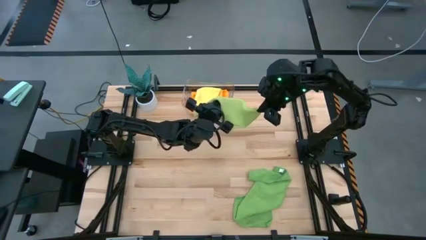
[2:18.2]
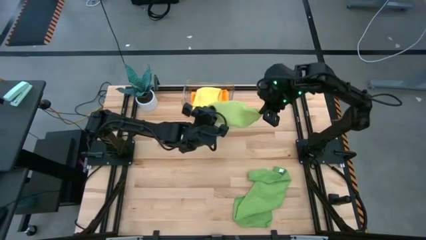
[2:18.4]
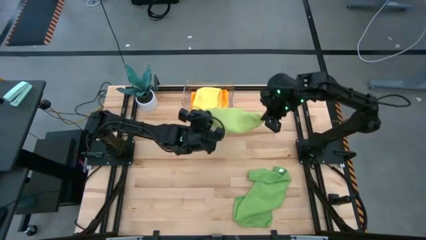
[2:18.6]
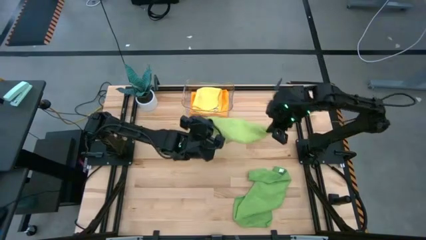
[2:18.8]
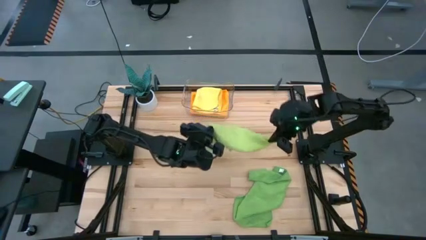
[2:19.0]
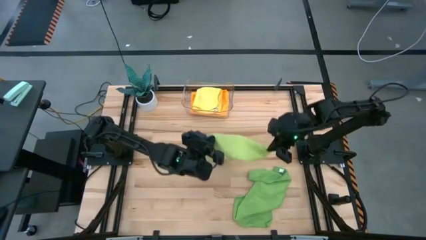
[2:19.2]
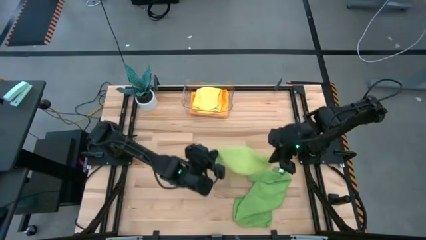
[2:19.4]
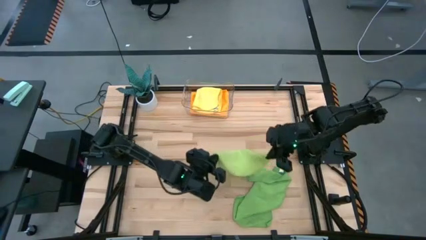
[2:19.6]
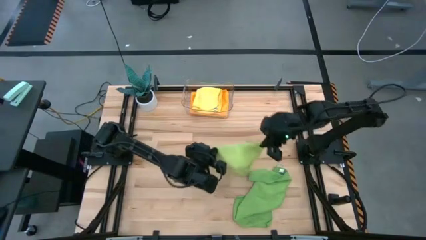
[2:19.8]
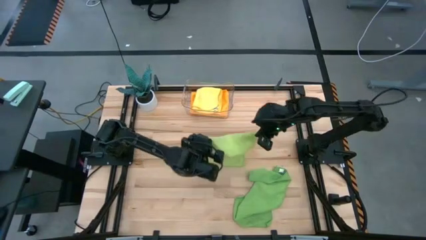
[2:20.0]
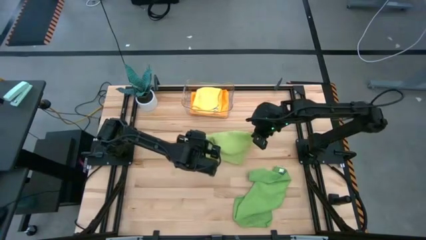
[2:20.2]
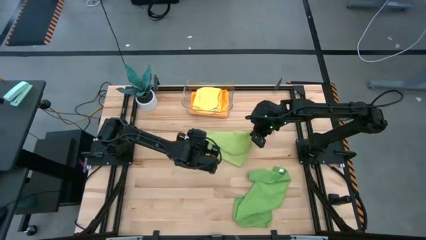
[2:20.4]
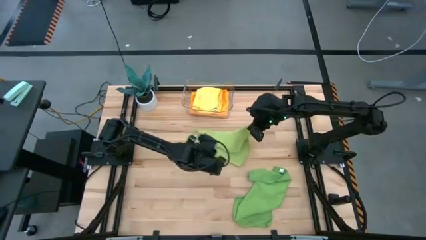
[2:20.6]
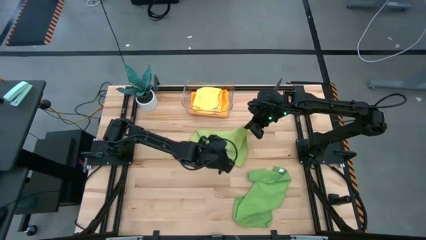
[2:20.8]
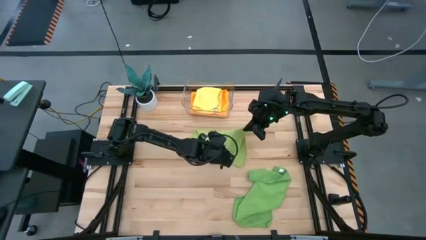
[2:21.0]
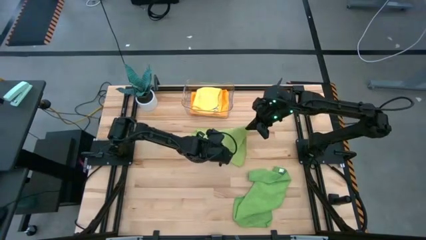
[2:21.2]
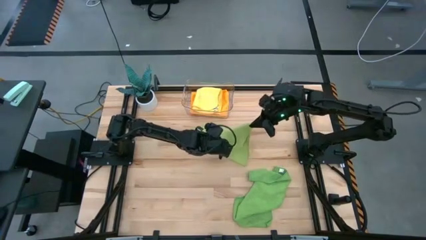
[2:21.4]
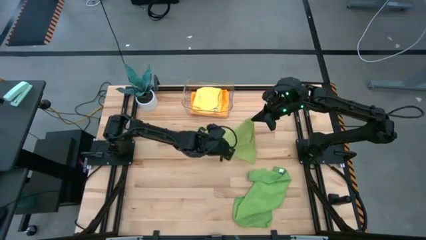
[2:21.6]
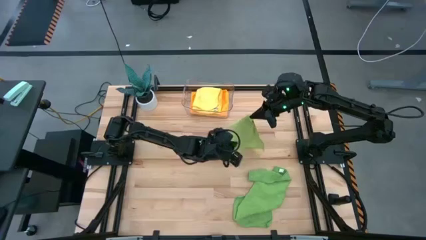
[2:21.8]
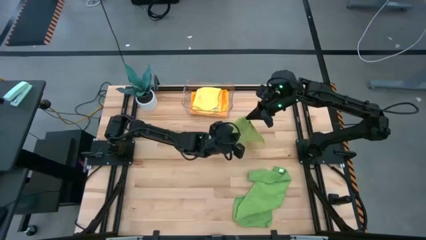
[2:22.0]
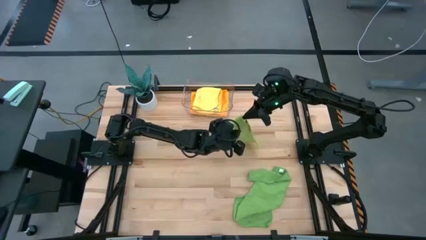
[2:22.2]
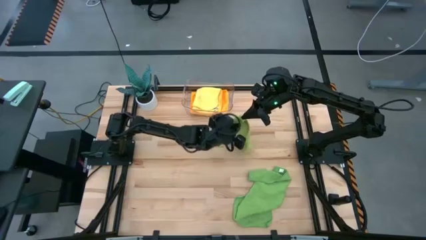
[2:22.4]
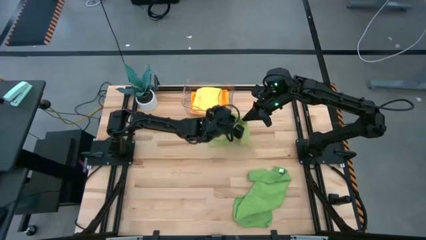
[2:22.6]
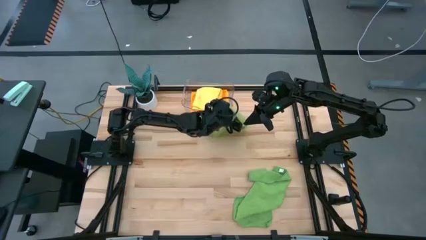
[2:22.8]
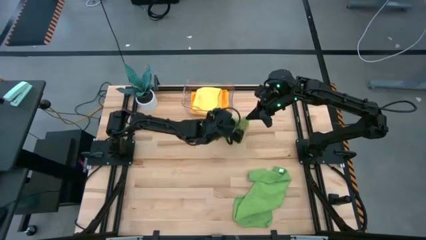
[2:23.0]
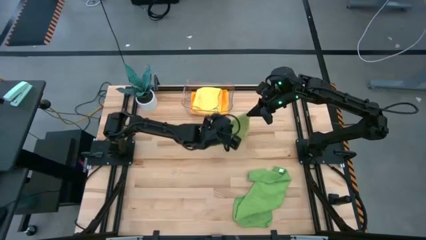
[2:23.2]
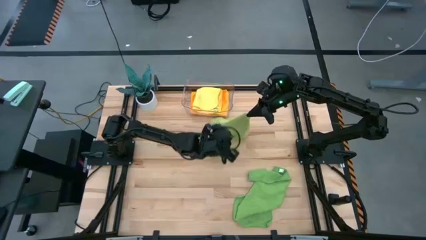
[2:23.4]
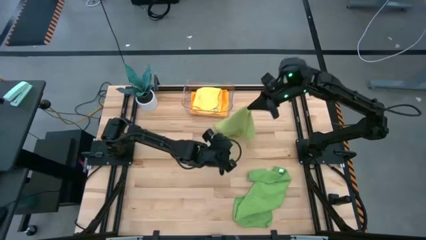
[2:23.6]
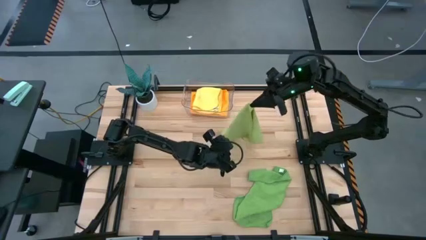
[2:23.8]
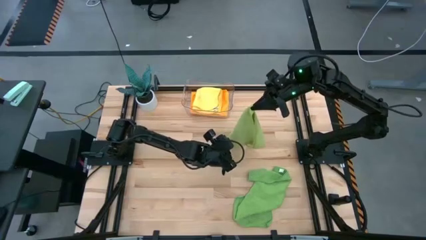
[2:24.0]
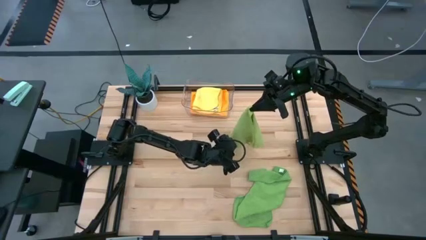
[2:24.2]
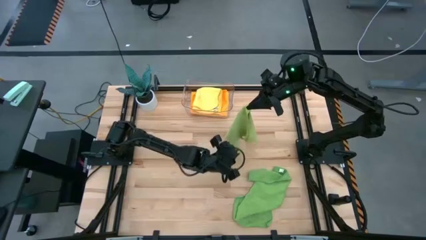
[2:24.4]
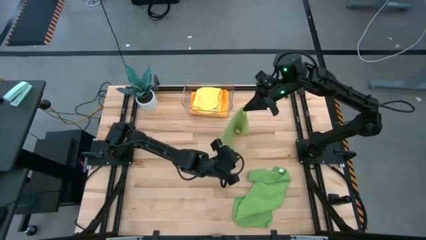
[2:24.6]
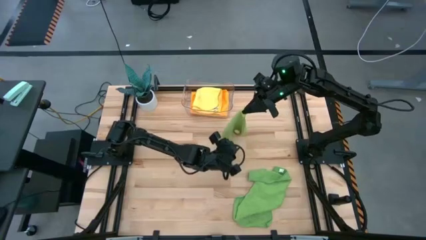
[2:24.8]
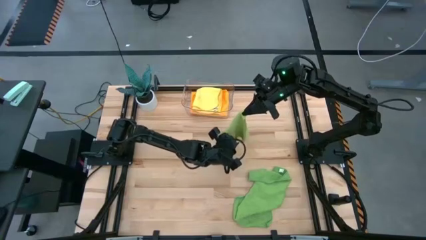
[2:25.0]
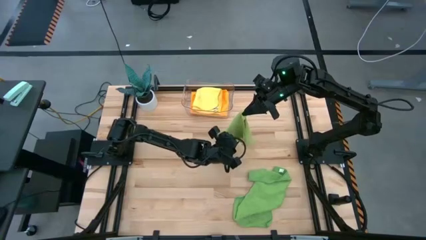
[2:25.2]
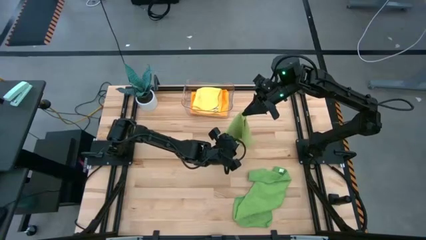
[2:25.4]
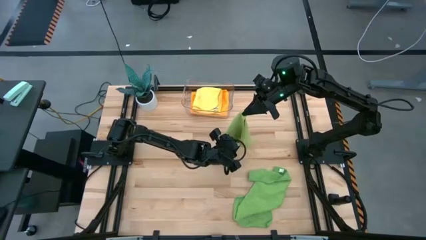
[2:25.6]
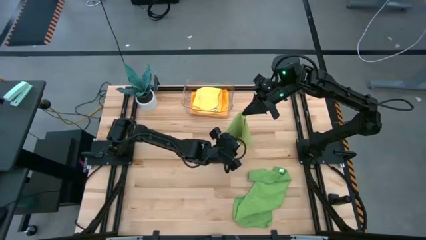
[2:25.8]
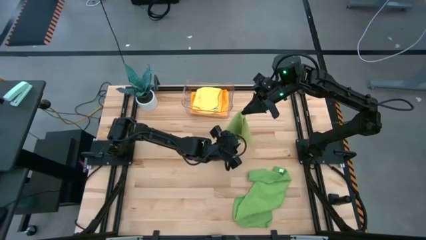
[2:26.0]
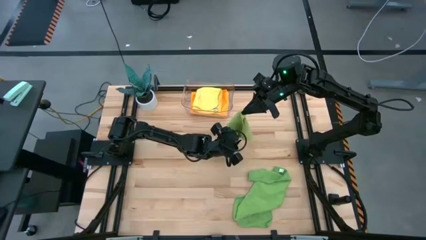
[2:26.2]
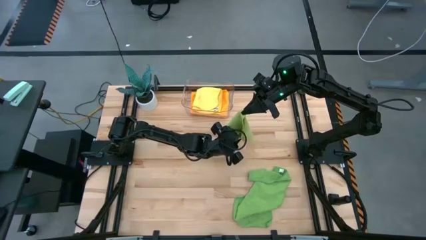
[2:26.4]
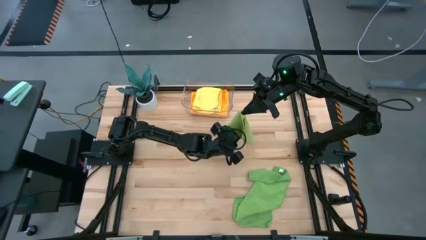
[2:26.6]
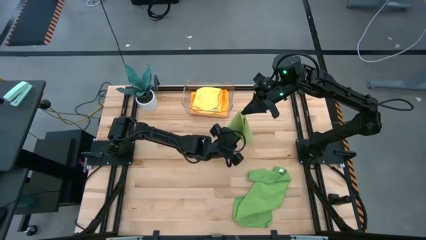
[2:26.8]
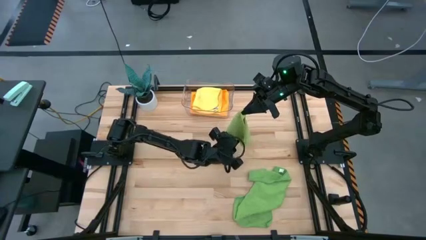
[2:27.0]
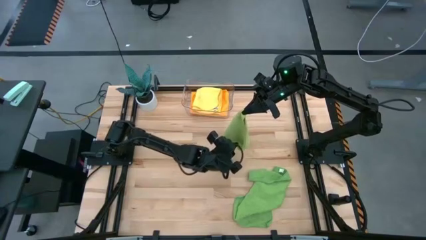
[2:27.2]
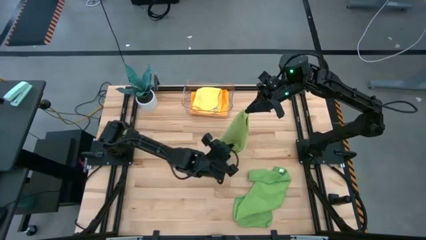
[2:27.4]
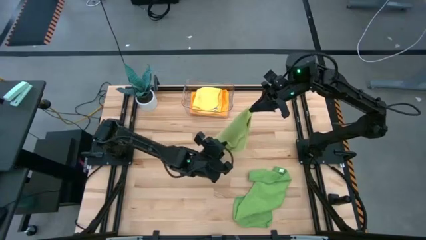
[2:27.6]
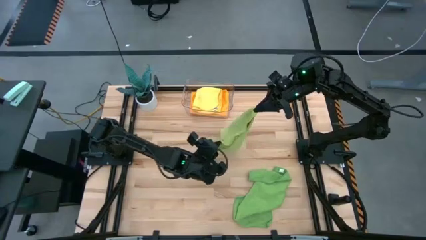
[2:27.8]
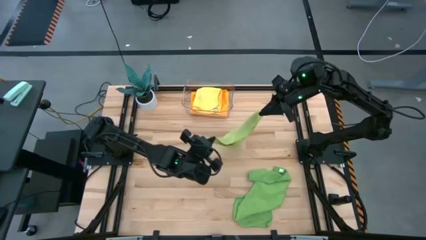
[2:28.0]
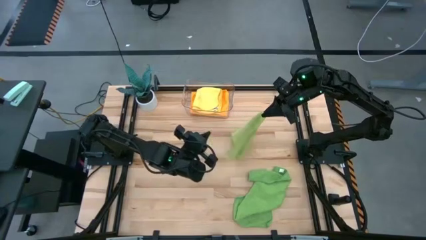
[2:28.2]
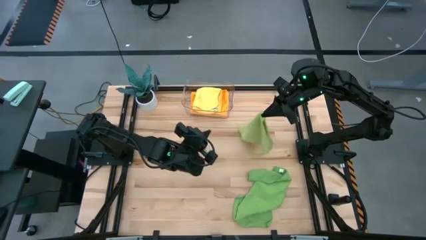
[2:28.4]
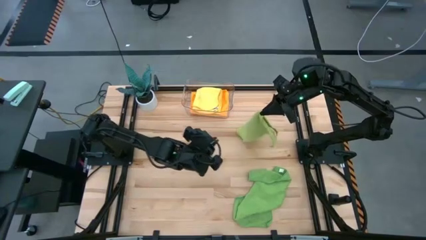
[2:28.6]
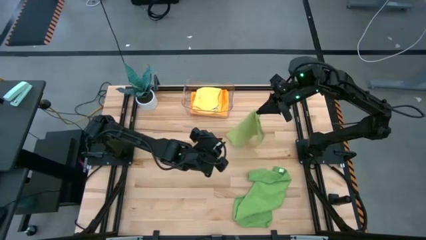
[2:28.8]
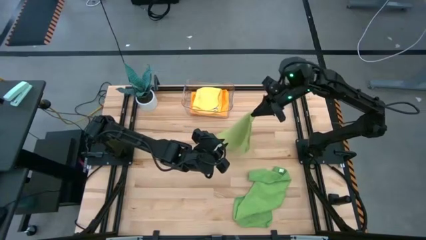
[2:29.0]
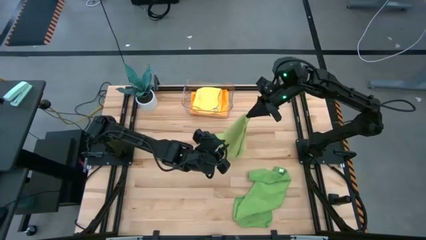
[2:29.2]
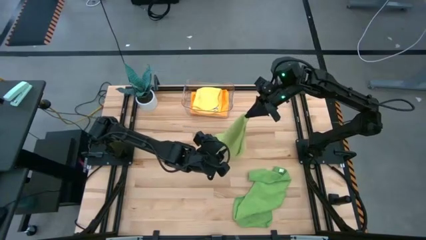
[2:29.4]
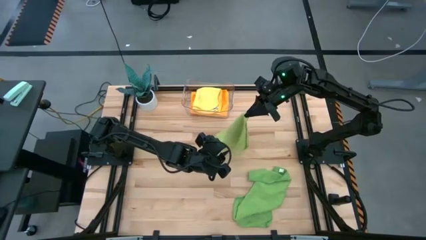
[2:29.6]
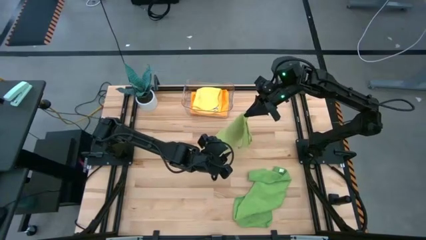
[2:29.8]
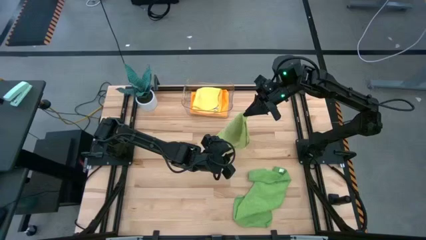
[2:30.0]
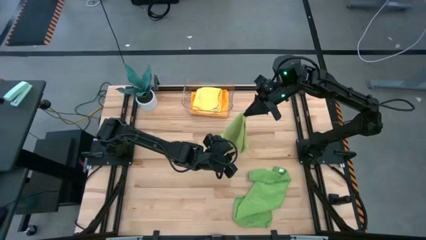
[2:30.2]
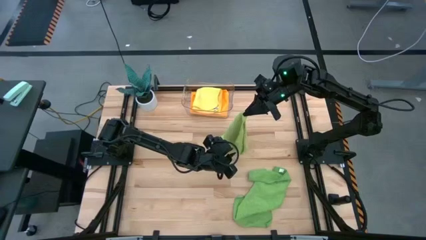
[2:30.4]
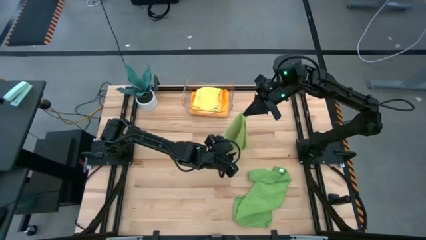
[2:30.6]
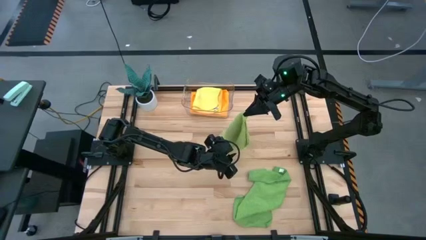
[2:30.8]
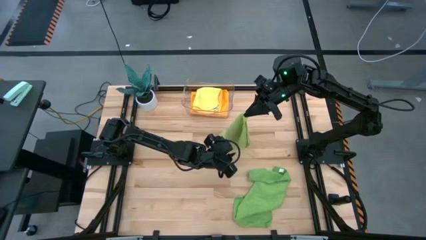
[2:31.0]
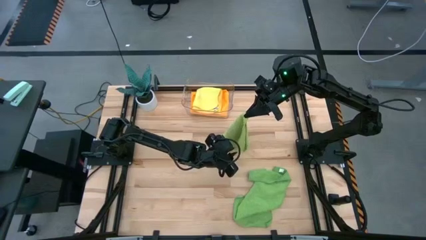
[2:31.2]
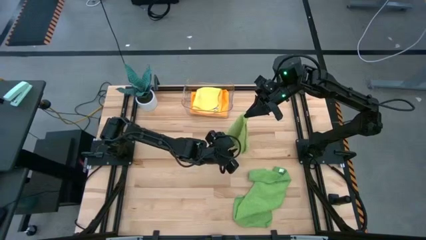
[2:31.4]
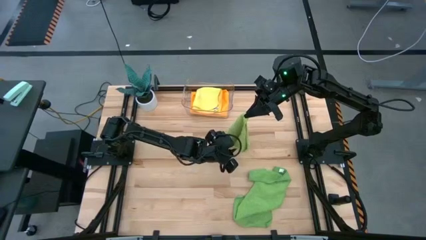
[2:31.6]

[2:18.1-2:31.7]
Task: Fold microfiber towels
Fold the light green towel
